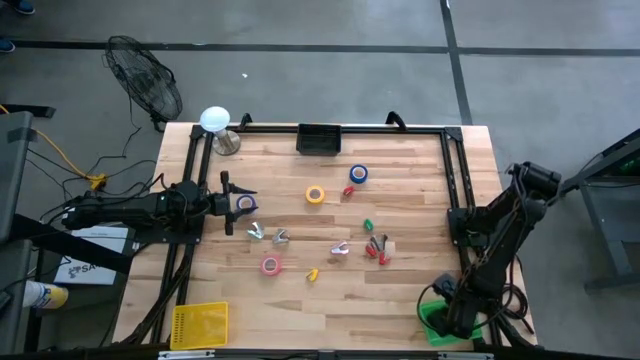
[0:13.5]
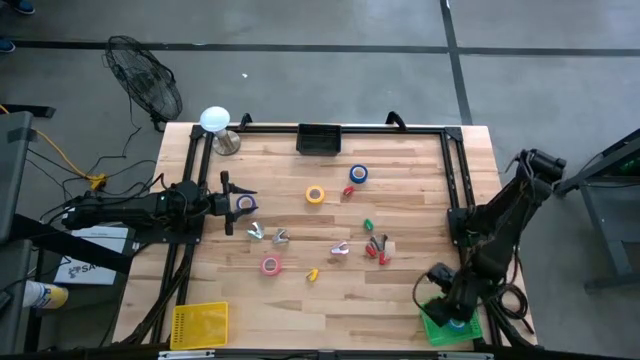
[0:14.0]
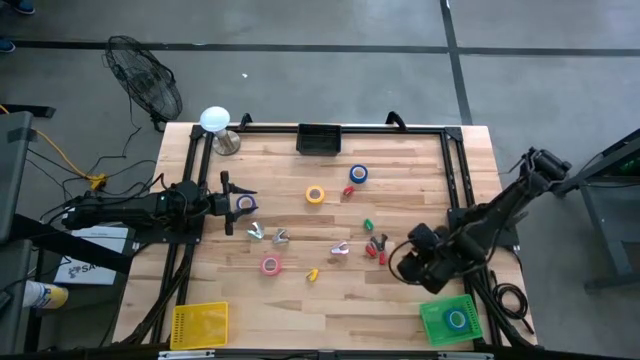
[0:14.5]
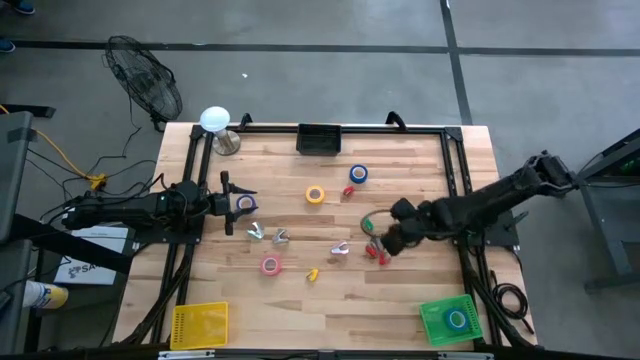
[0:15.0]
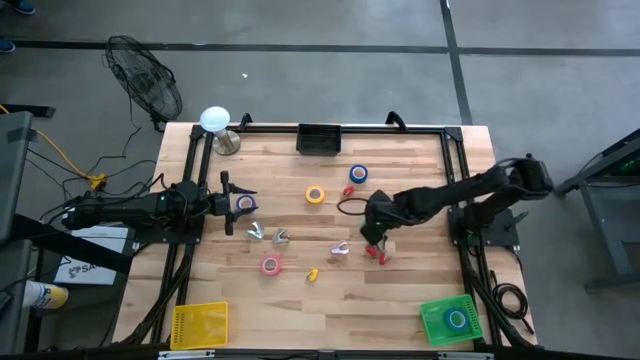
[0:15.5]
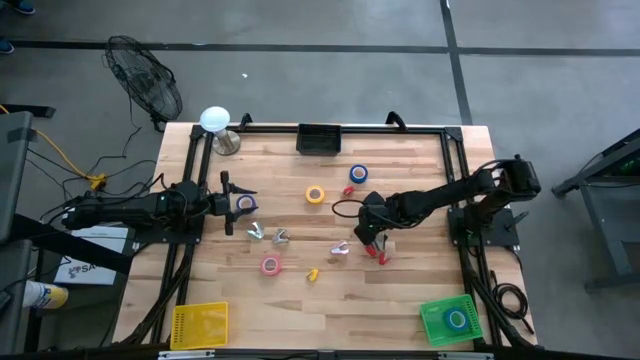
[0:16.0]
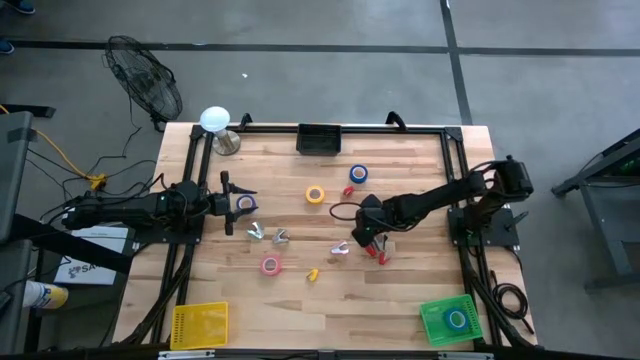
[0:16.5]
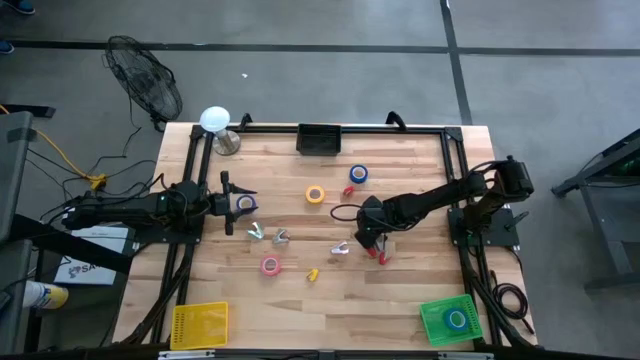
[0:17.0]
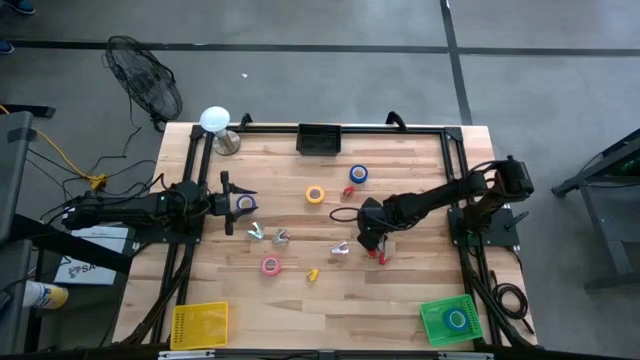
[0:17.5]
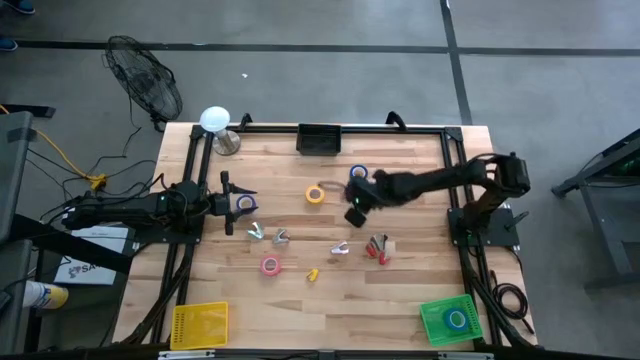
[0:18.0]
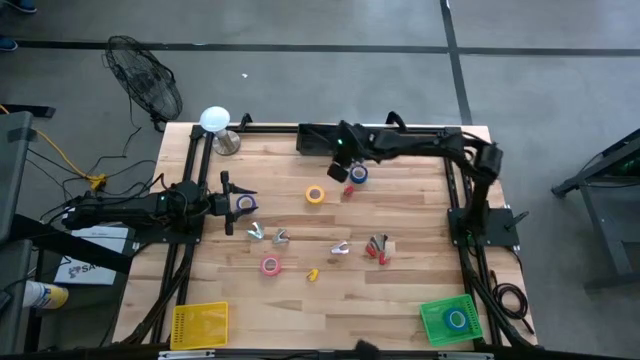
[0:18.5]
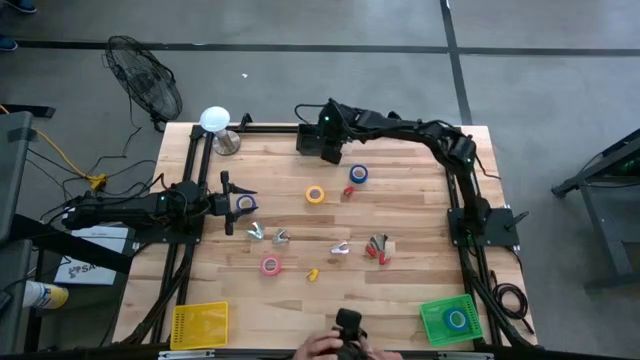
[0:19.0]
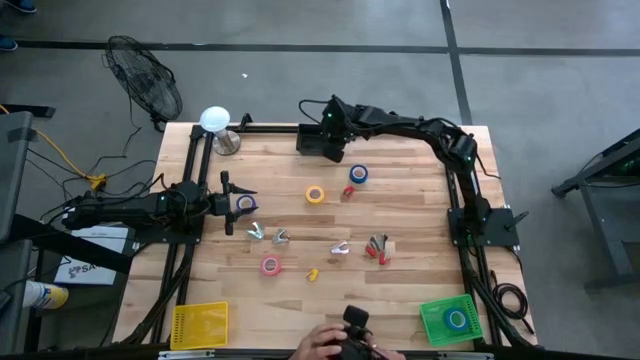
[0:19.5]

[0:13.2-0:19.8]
Task: Pick and place Stapler, Stapler remover, tape
Put the green stapler into the black bin

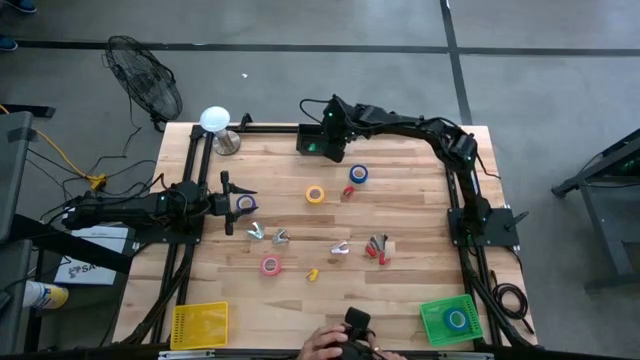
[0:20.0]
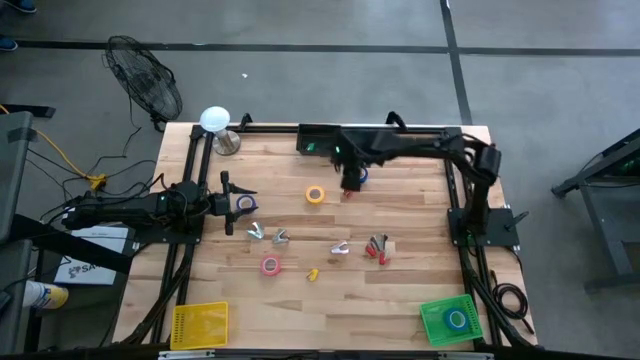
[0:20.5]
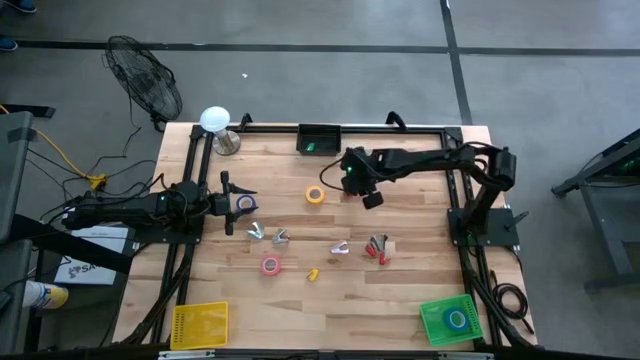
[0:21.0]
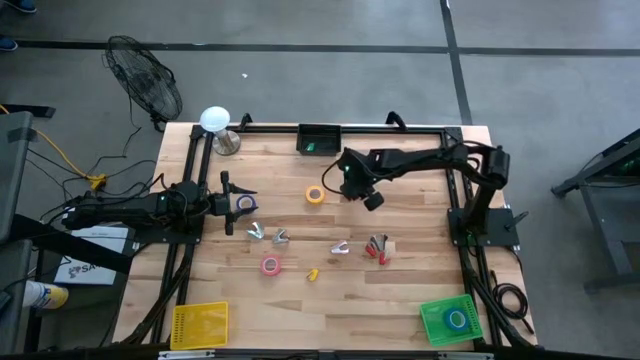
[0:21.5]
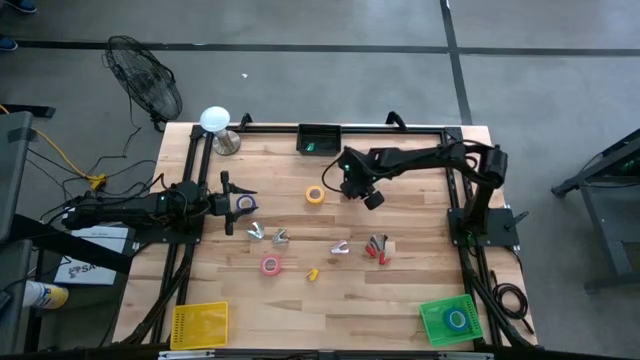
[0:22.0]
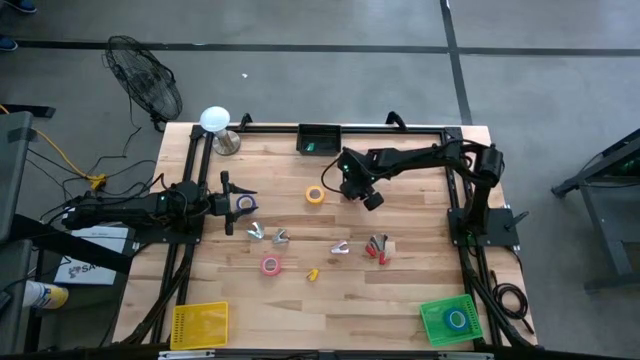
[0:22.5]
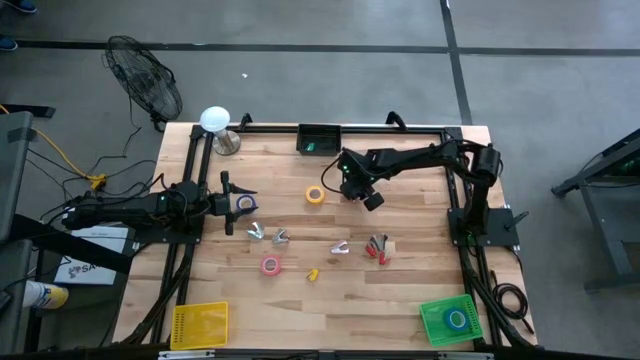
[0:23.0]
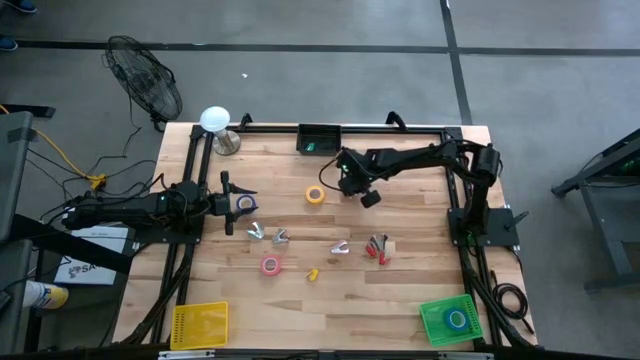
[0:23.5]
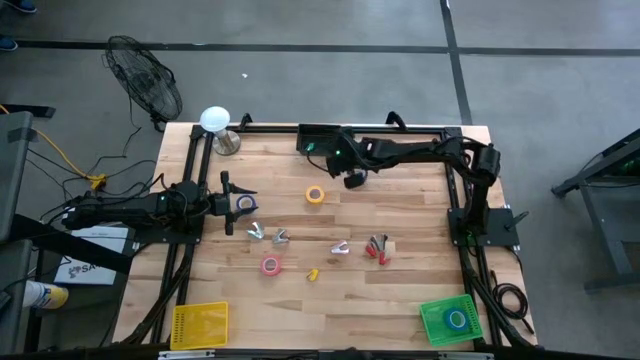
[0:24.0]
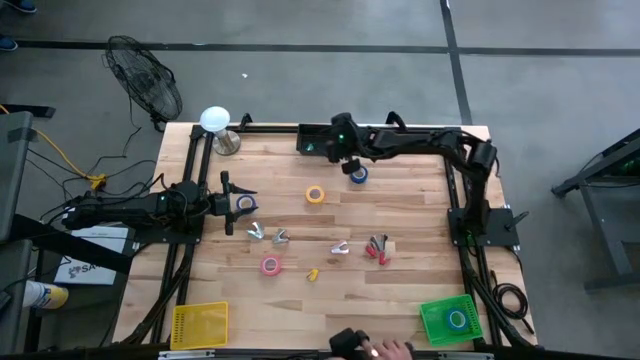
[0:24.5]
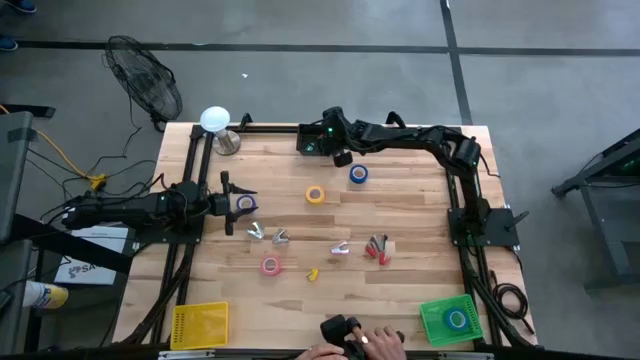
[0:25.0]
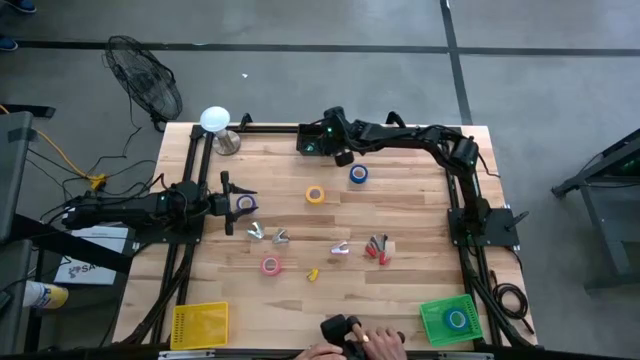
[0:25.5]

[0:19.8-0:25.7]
Put the top red stapler into the black bin

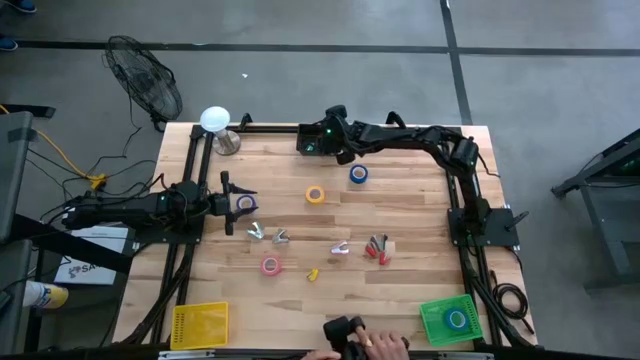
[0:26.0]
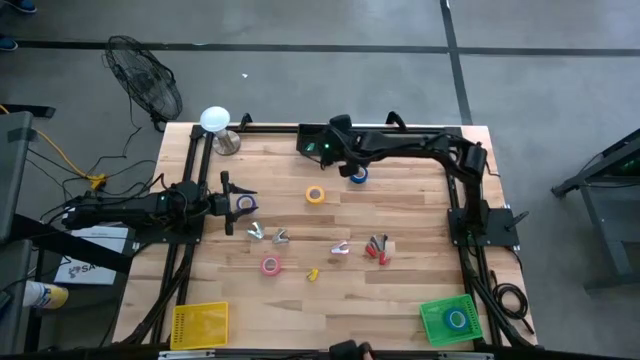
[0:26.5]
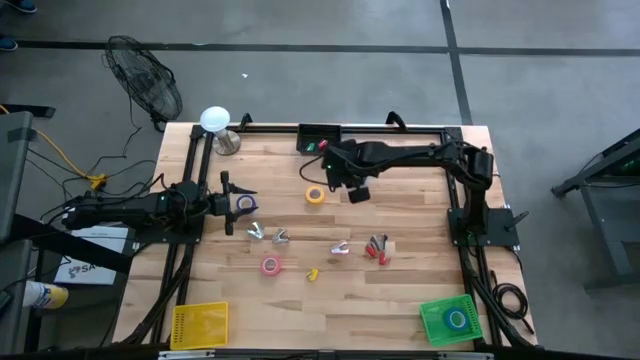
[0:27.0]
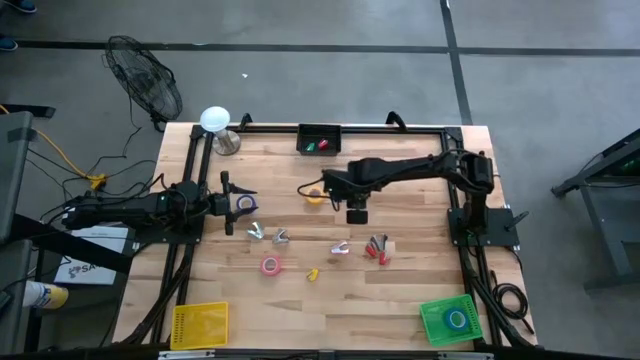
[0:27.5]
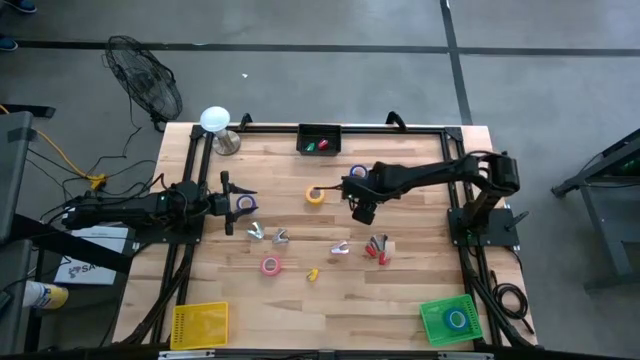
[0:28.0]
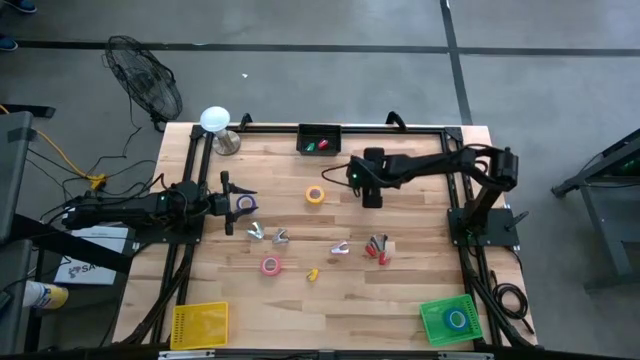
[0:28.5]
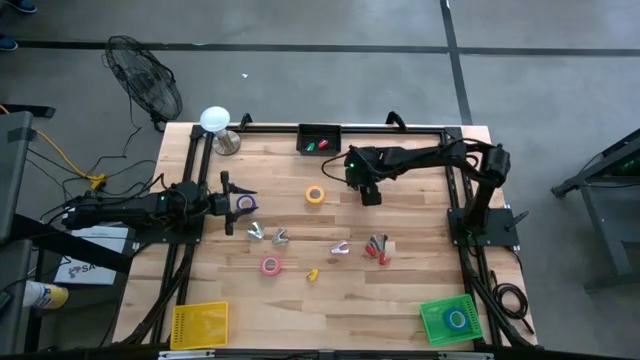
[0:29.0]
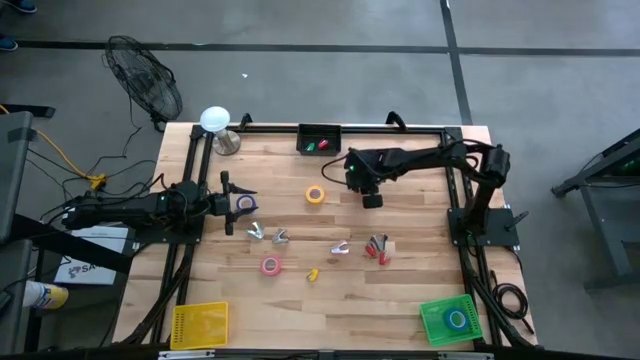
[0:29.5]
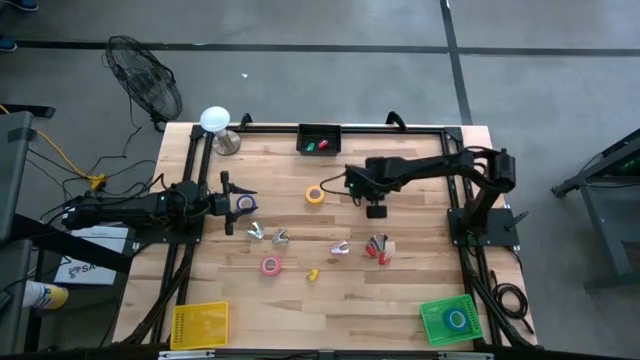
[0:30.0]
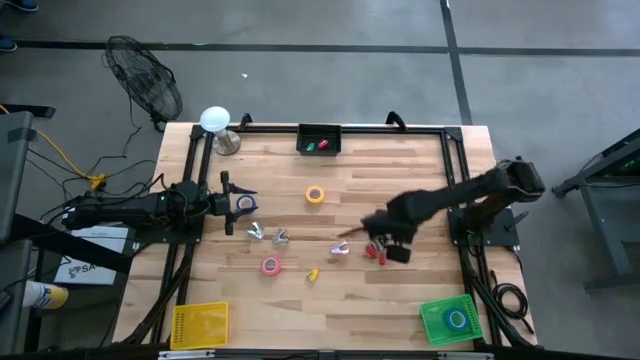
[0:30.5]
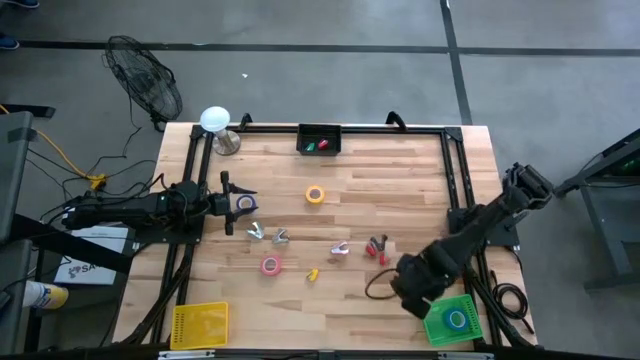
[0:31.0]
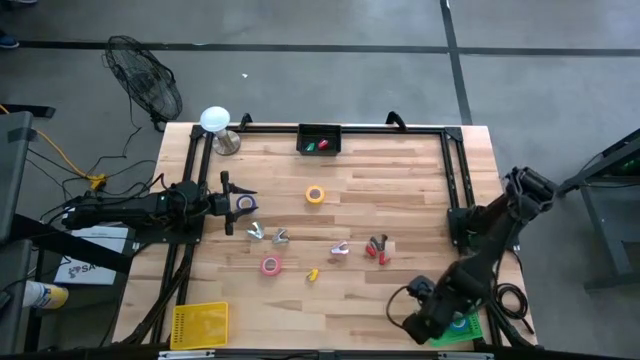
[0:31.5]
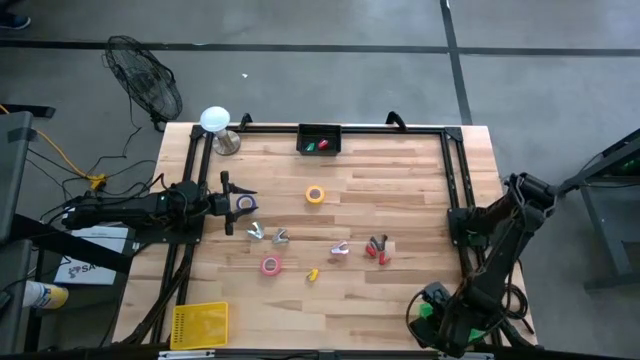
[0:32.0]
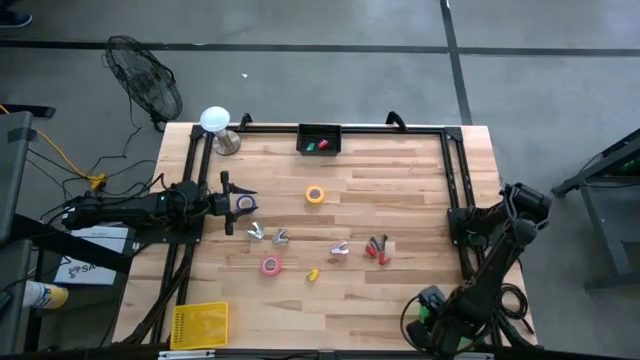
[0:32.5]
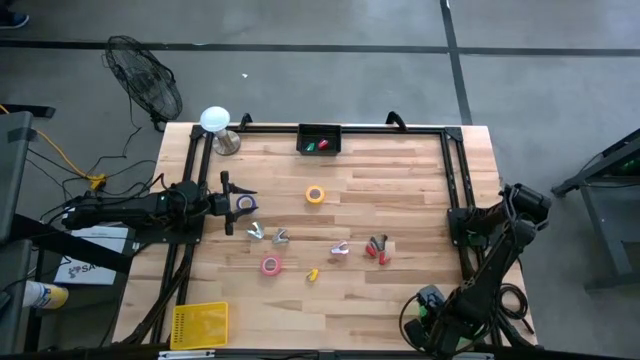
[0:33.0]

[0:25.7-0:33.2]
Put the right blue tape into the green bin
